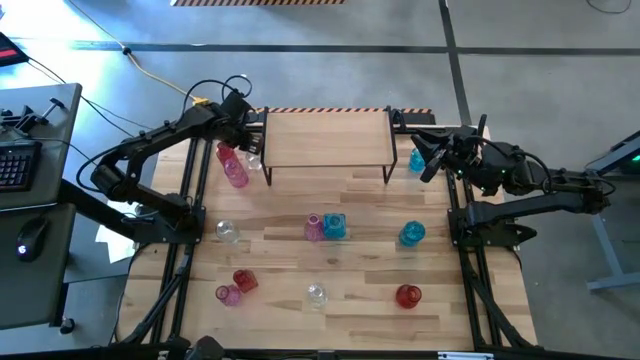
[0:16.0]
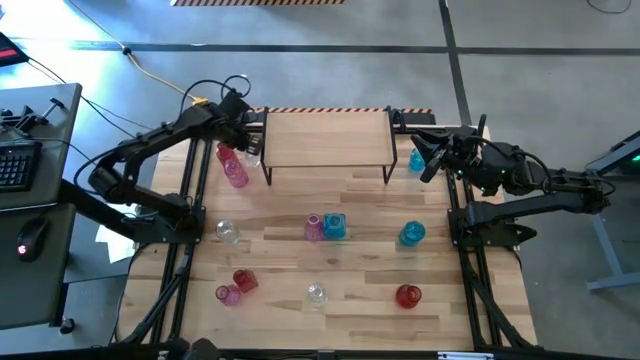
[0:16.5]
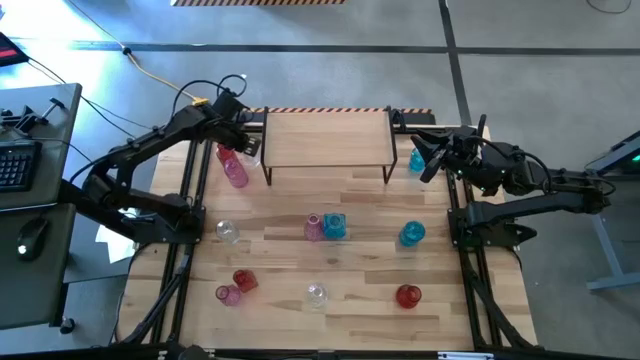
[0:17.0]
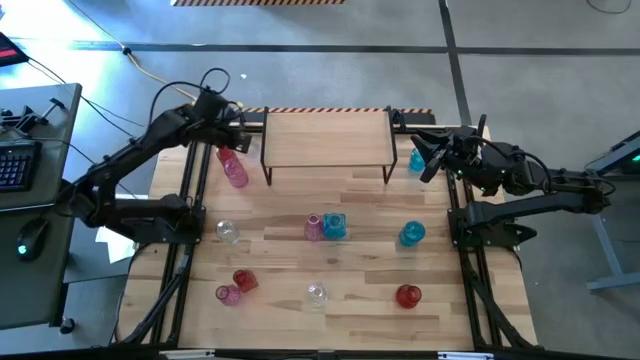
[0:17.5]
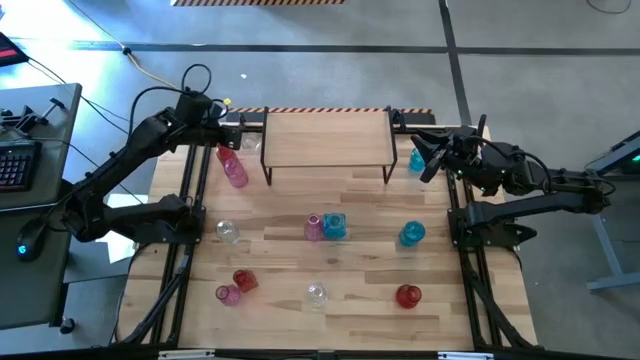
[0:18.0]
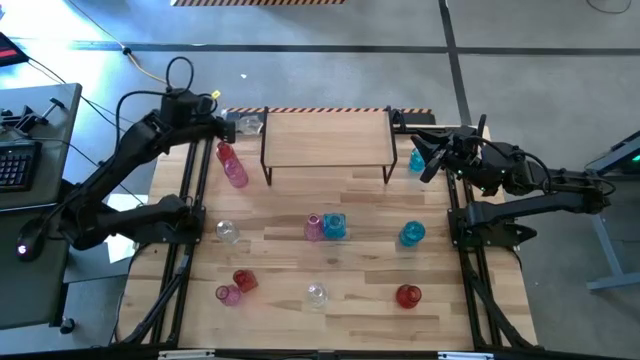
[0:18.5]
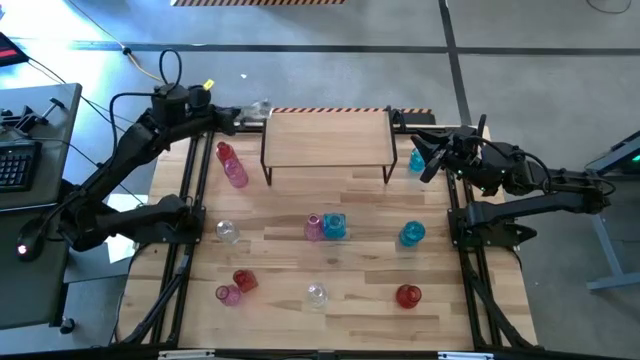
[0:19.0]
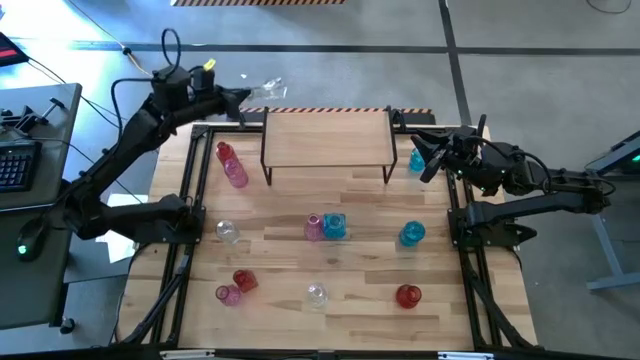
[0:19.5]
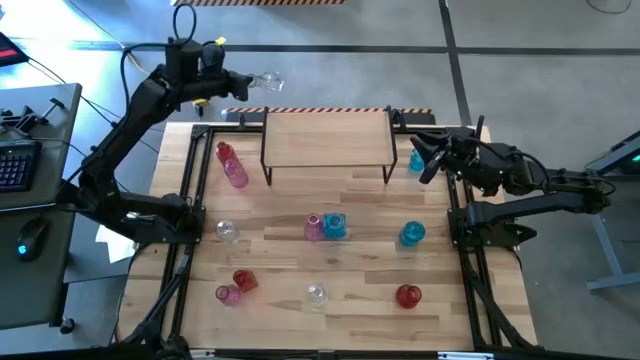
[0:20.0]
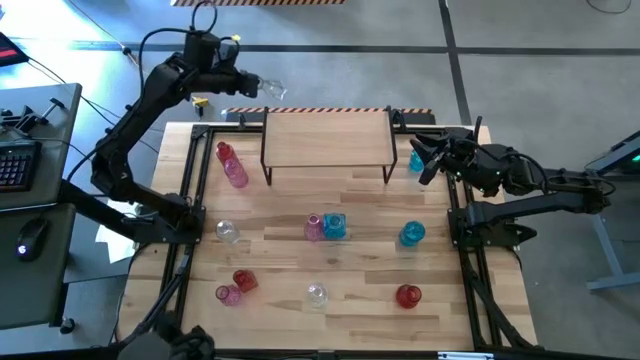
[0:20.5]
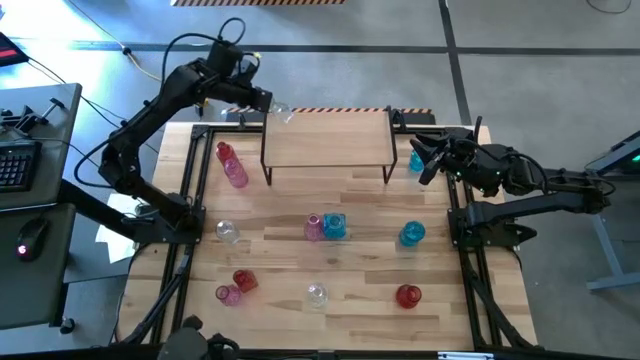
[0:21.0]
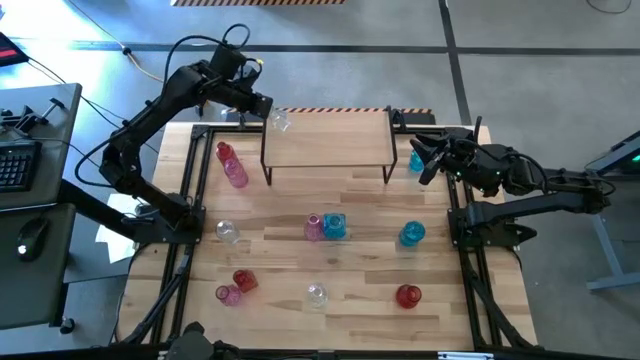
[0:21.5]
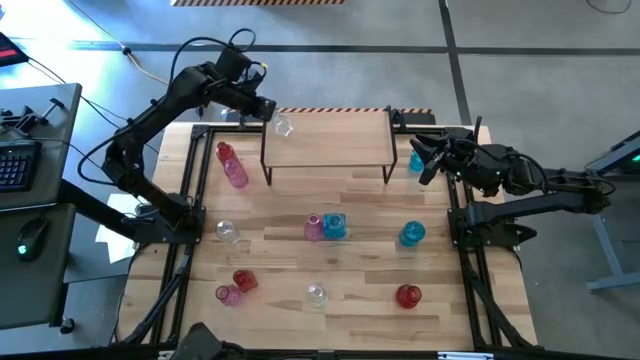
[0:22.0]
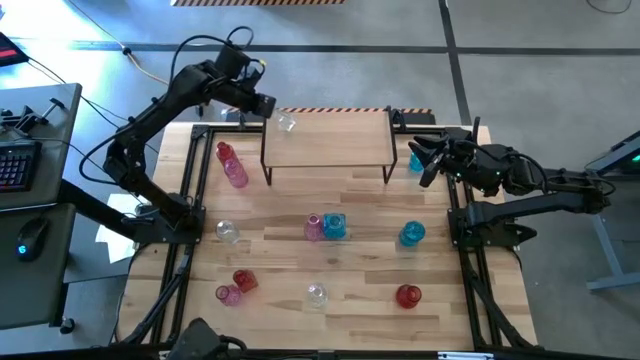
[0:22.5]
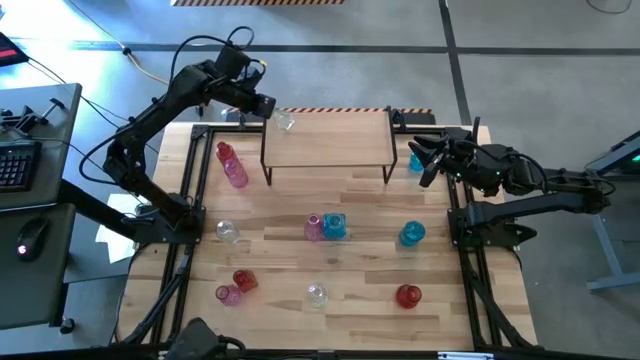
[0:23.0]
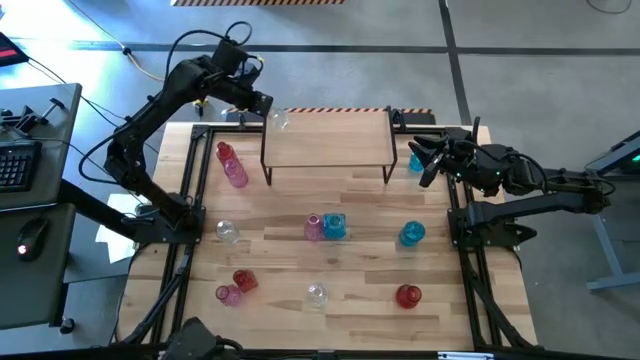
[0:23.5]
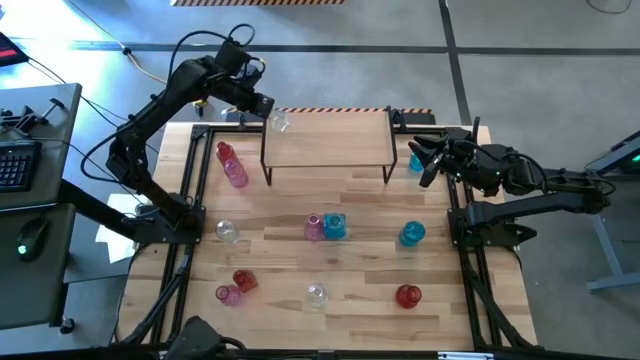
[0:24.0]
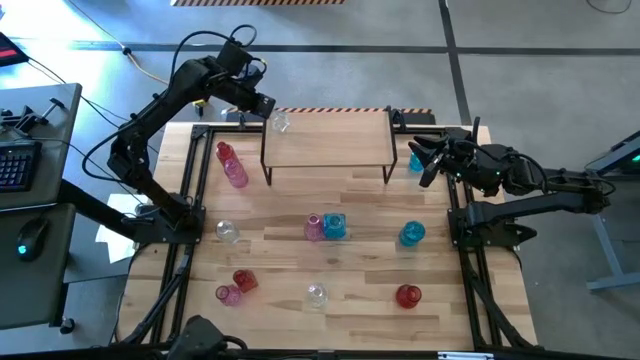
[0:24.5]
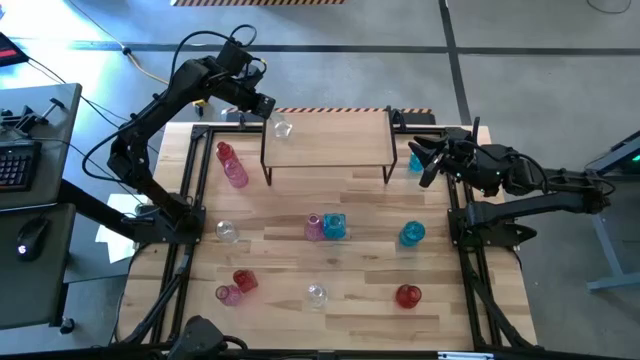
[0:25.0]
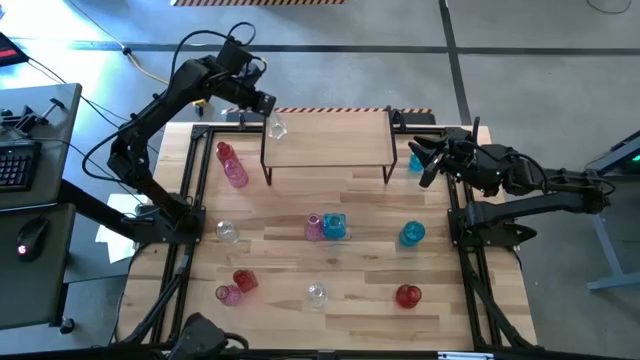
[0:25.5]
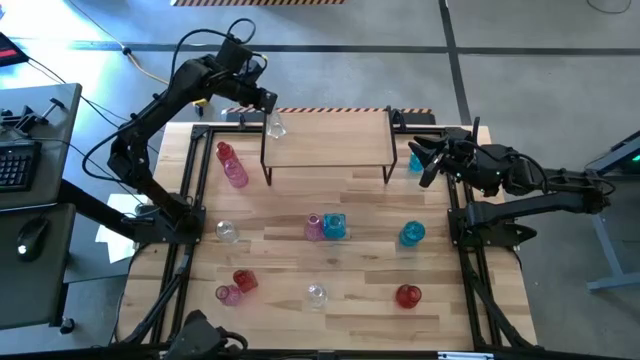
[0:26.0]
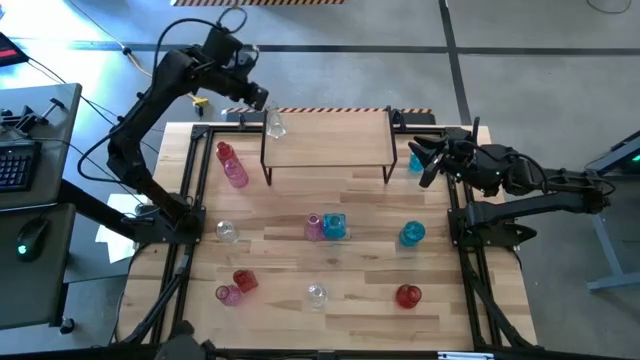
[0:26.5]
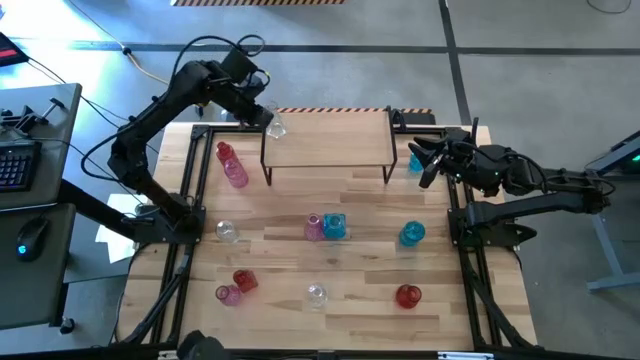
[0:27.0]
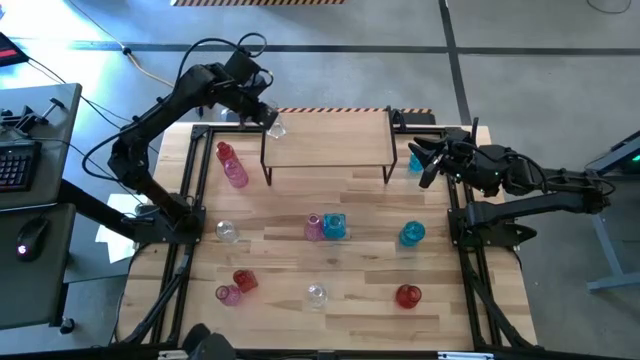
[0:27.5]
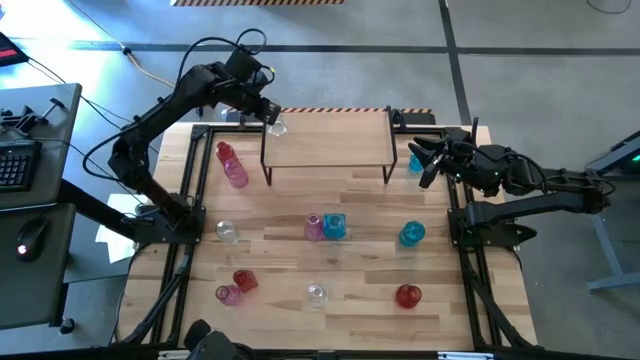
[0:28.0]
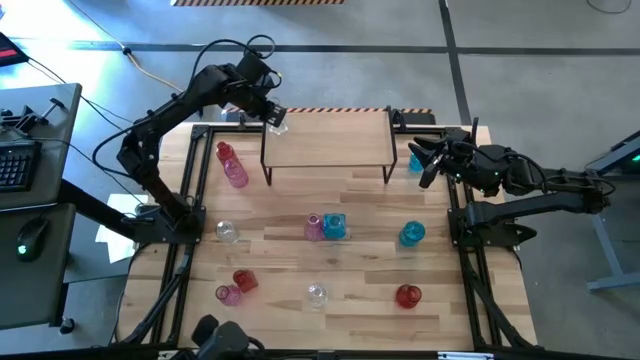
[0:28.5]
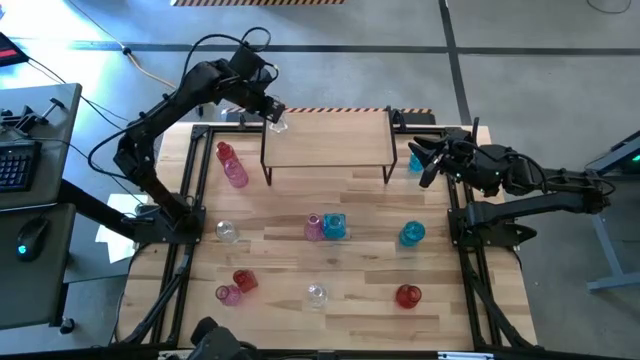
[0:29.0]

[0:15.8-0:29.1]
Task: sort vases onto shelf
Put the top transparent vase on the shelf
